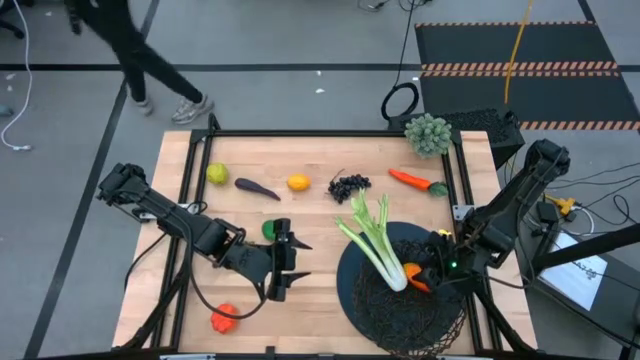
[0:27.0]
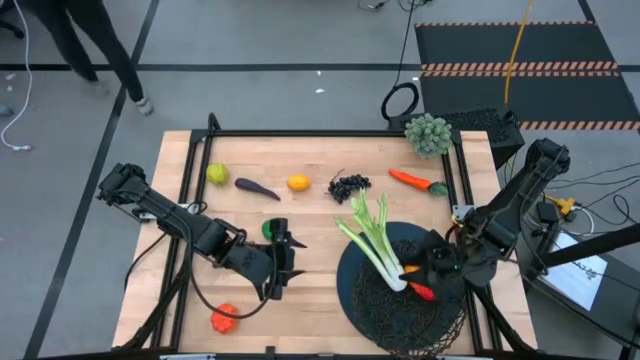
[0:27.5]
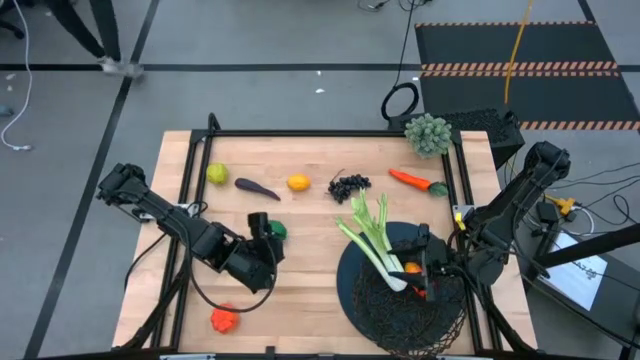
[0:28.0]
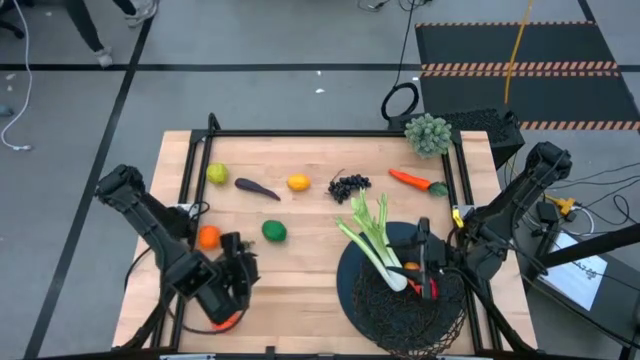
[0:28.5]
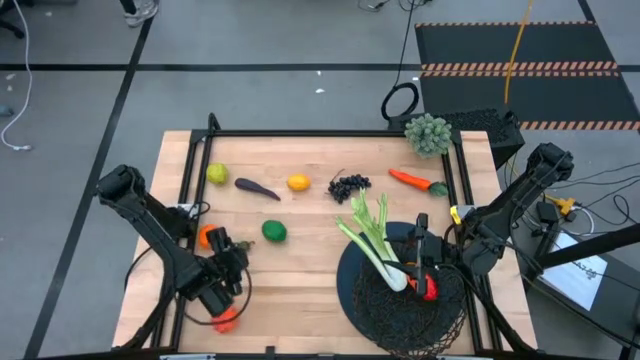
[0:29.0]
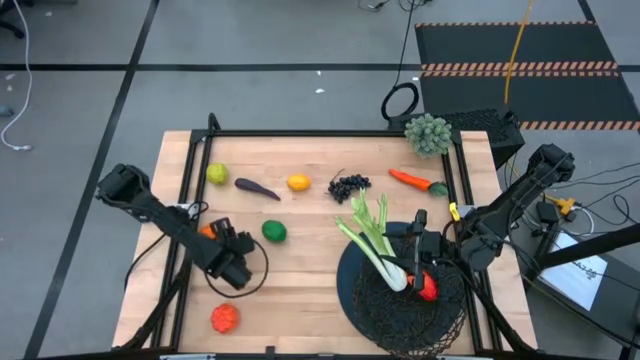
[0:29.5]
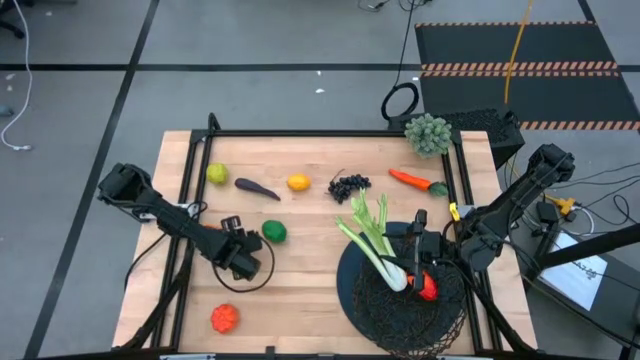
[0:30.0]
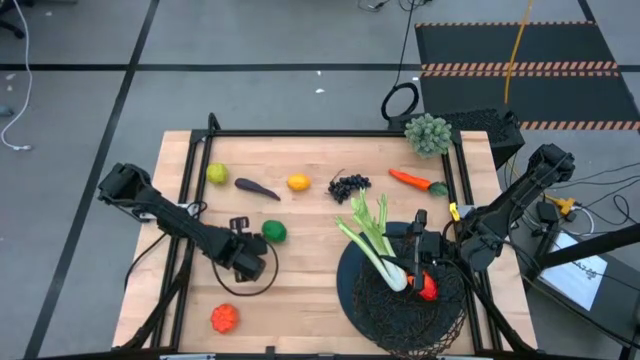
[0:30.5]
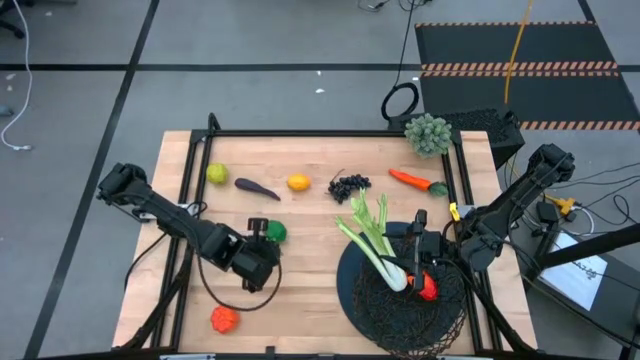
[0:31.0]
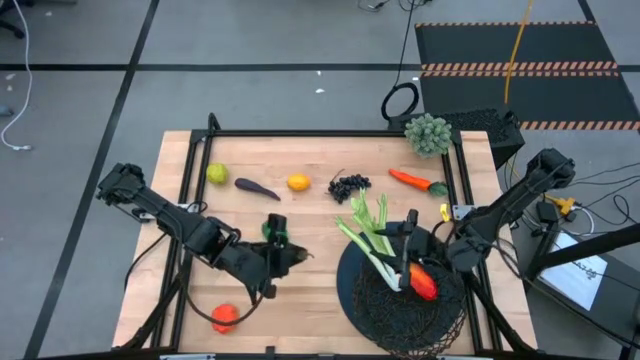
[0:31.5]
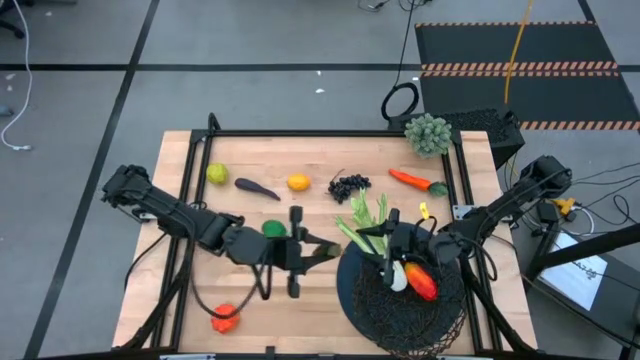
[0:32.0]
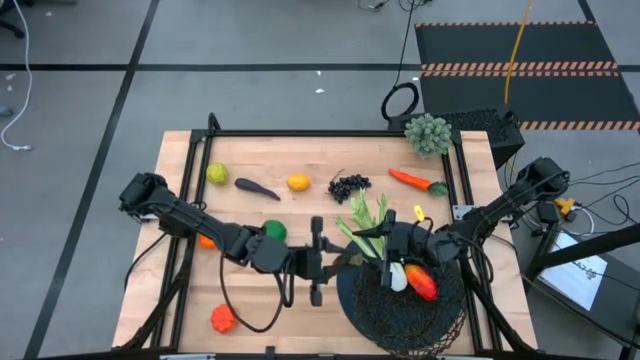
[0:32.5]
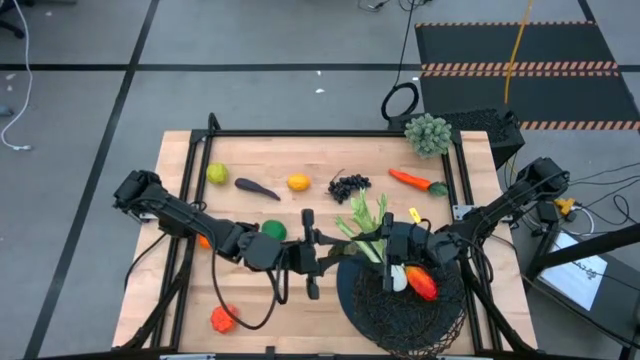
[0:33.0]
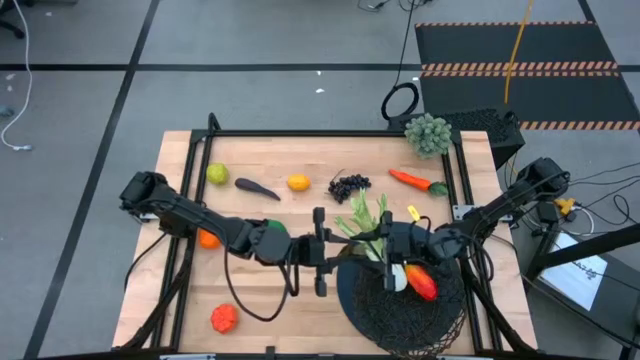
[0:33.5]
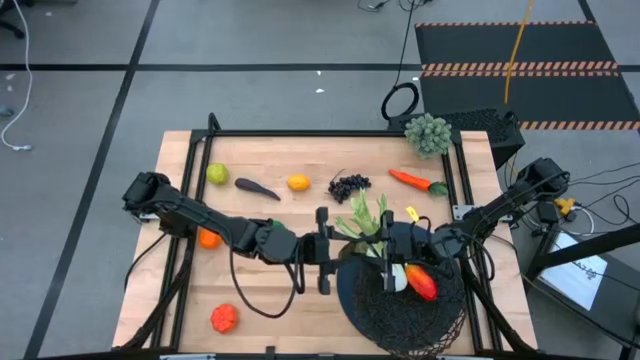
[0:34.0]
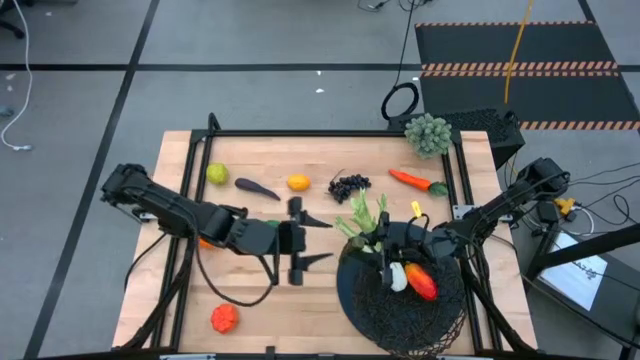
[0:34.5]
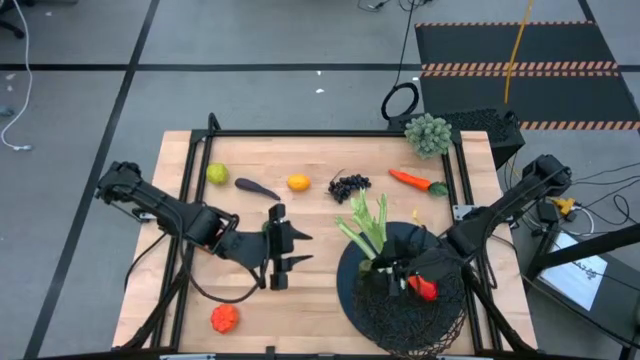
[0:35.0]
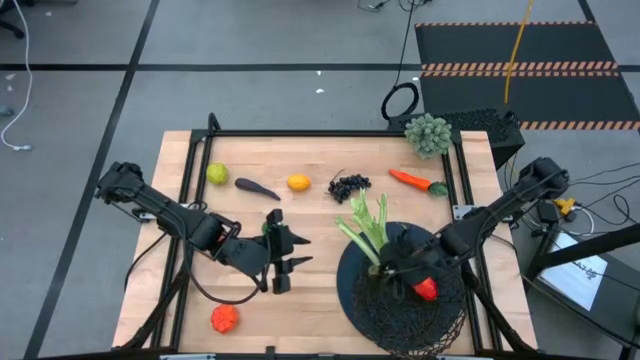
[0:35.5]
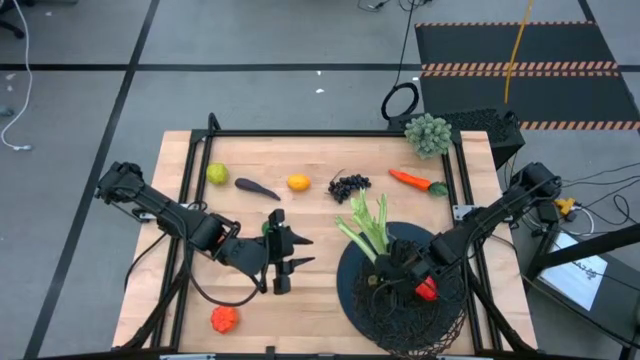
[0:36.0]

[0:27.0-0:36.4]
Task: Build produce basket
Put the green chili pepper into the wire basket

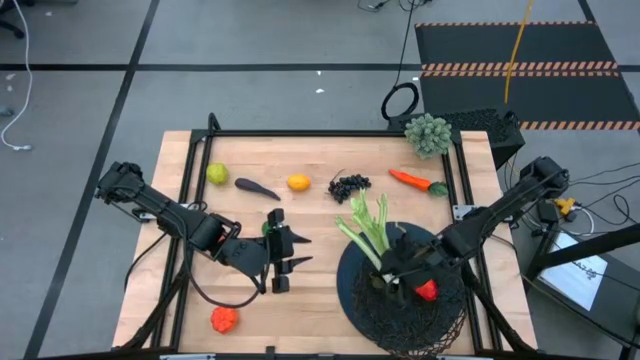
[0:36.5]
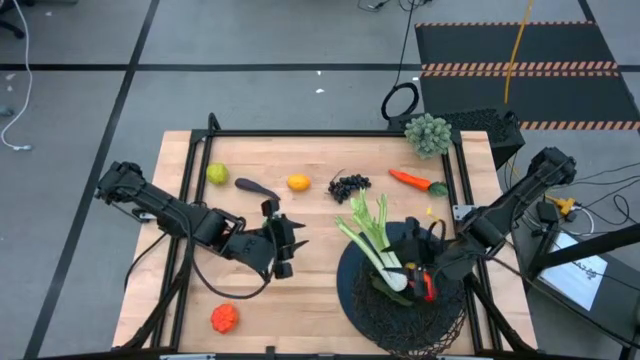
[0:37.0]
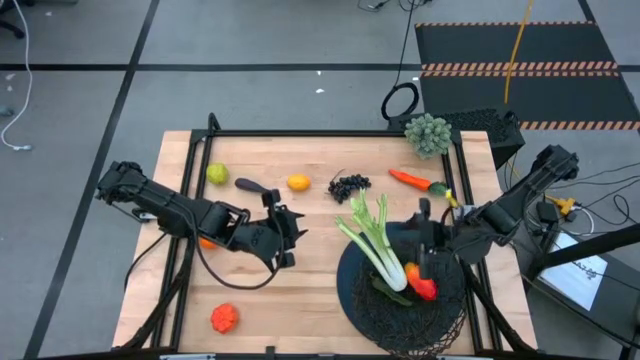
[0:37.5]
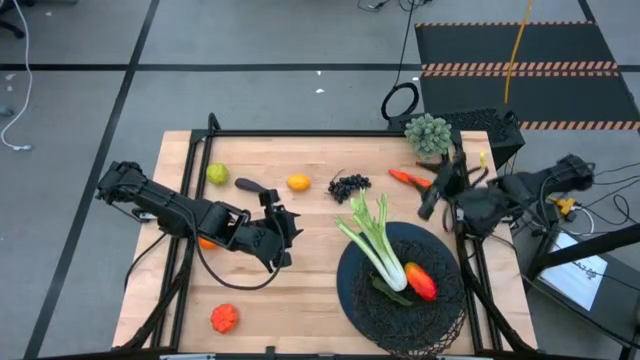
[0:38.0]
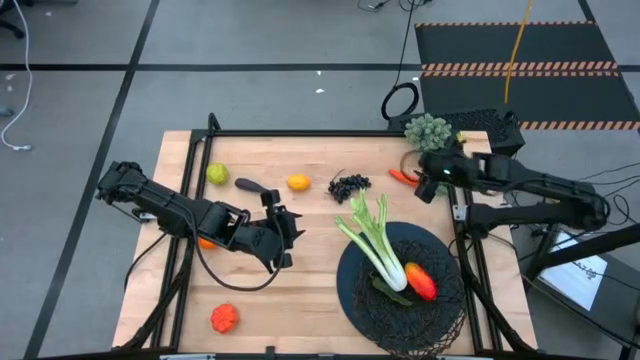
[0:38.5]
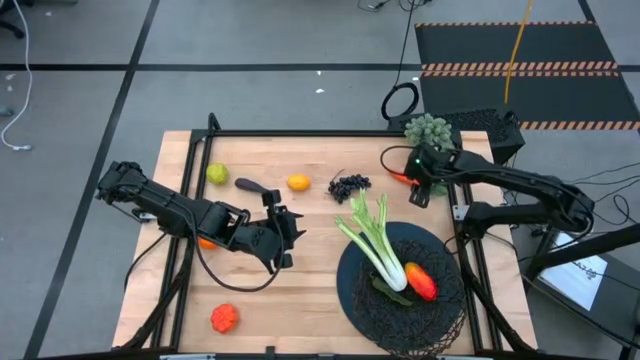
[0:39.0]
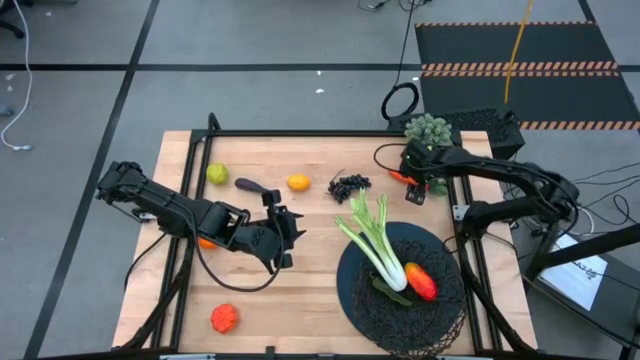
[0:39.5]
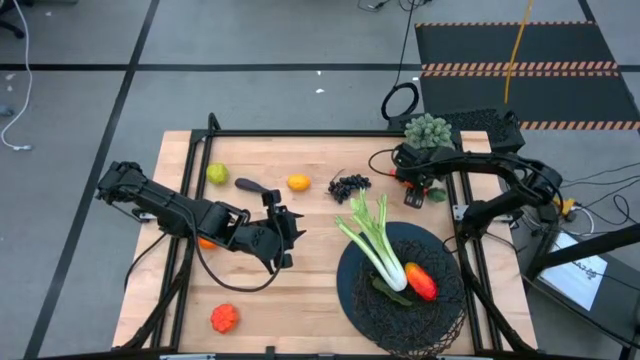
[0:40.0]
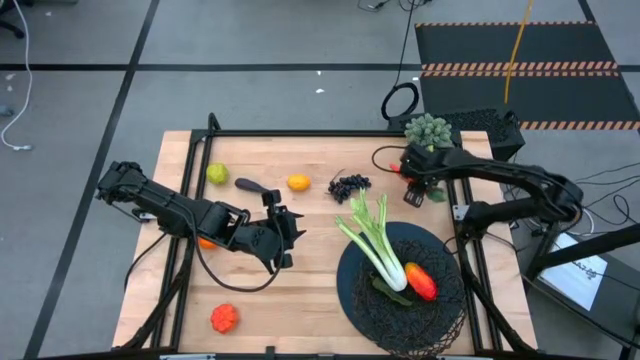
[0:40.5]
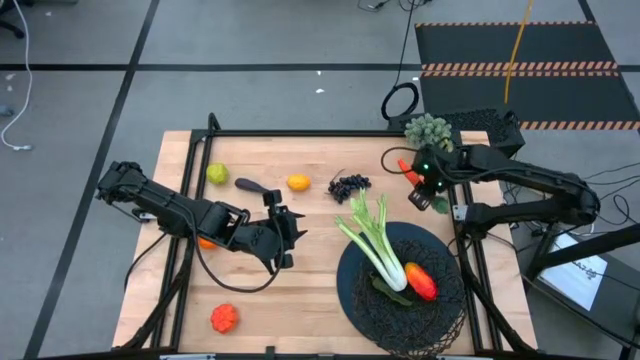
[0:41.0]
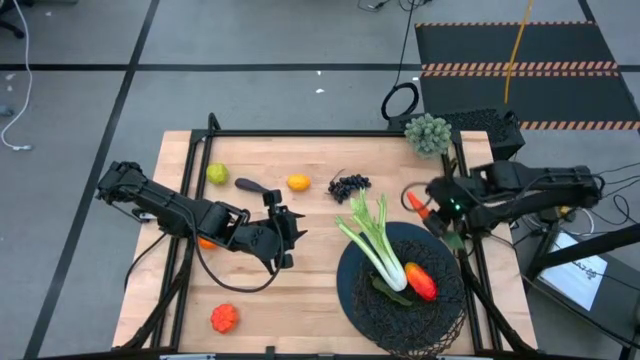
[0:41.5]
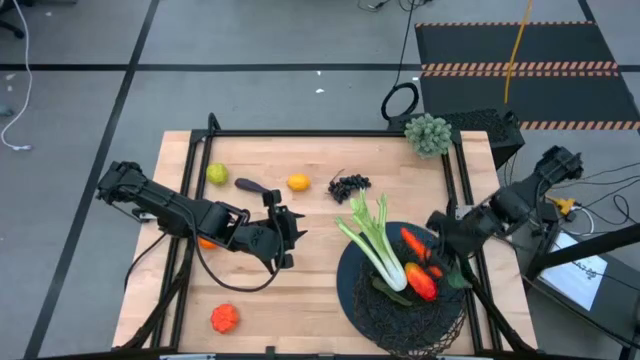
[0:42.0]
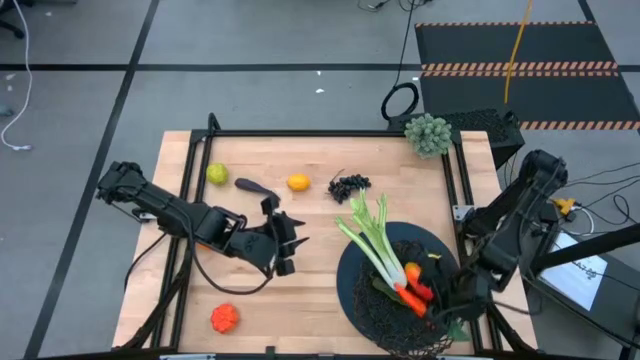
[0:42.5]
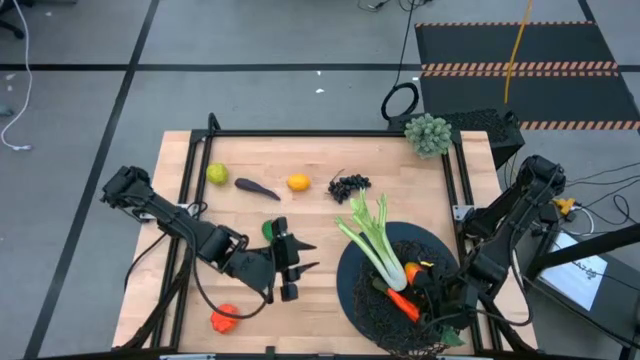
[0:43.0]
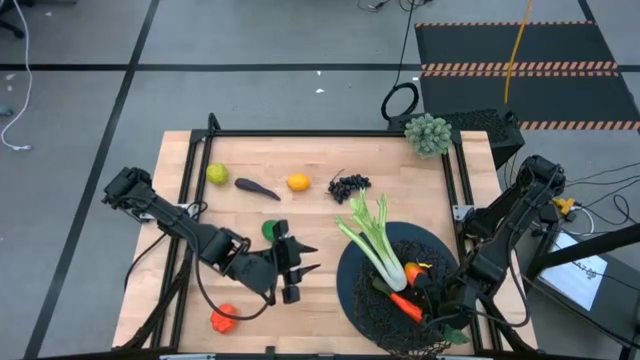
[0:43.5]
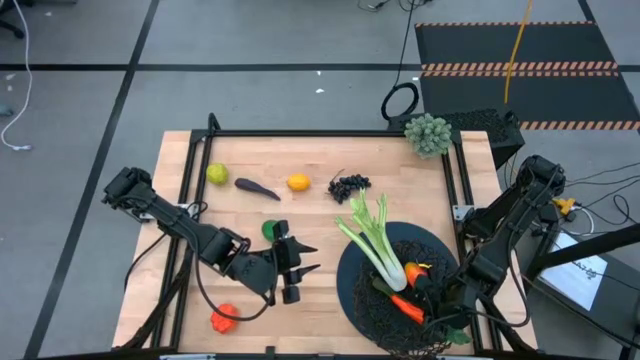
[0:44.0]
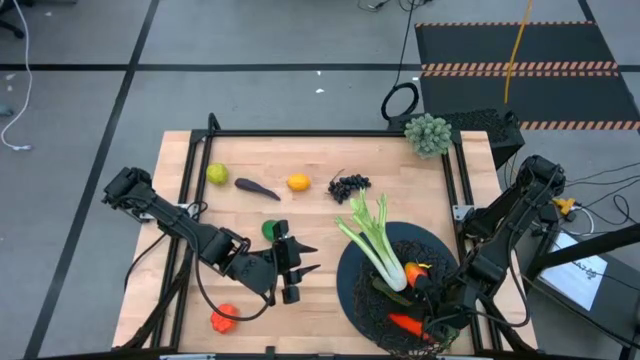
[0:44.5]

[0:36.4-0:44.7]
Put the carrot into the wire basket

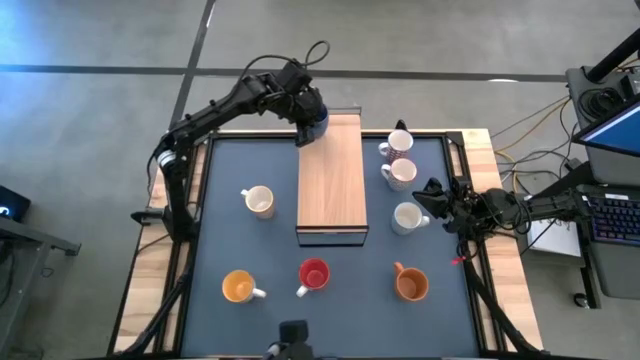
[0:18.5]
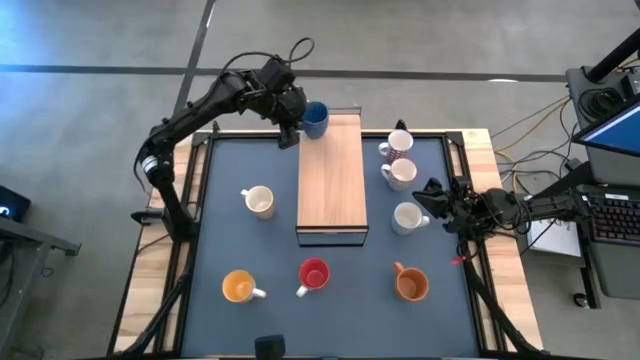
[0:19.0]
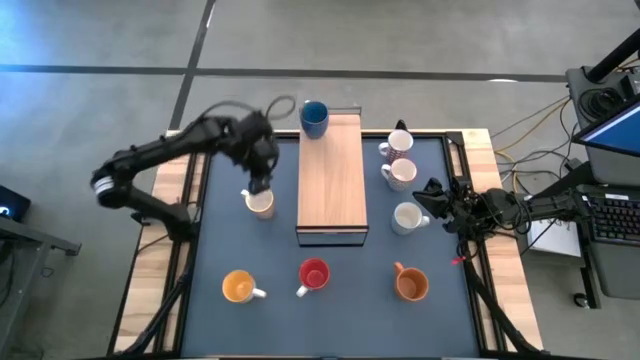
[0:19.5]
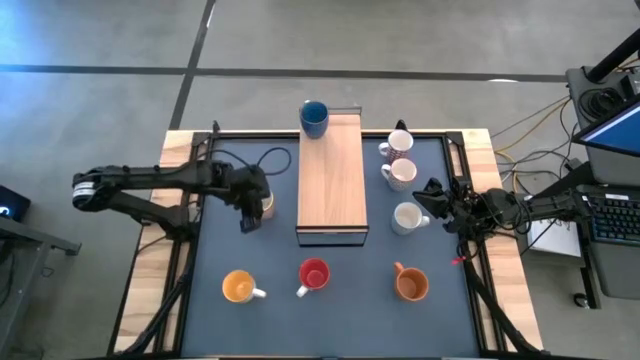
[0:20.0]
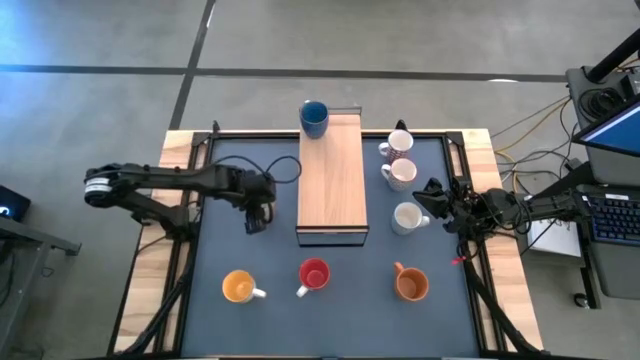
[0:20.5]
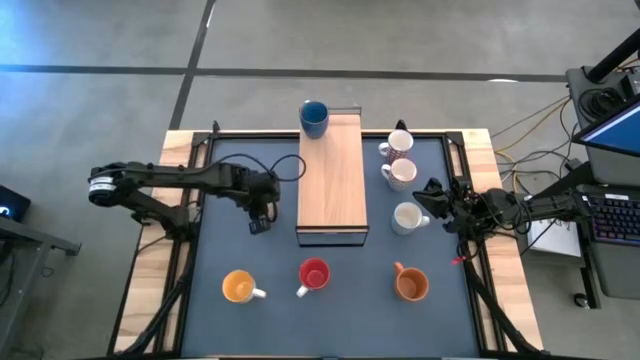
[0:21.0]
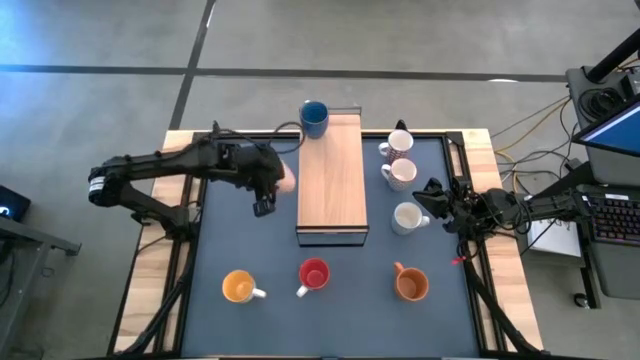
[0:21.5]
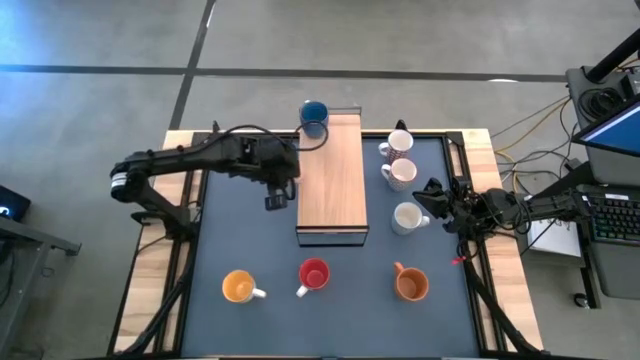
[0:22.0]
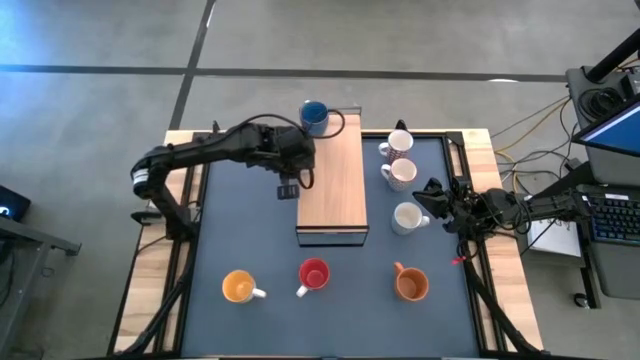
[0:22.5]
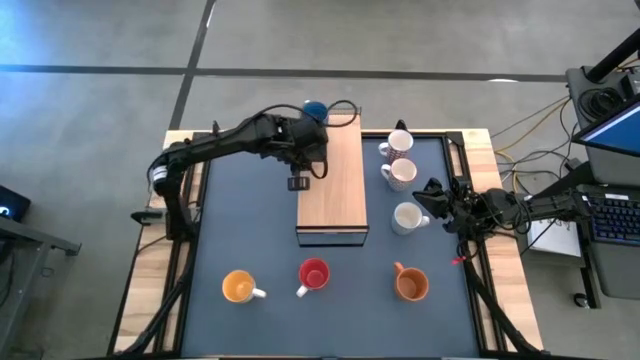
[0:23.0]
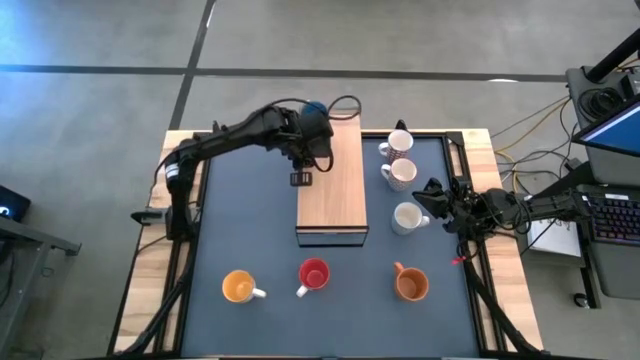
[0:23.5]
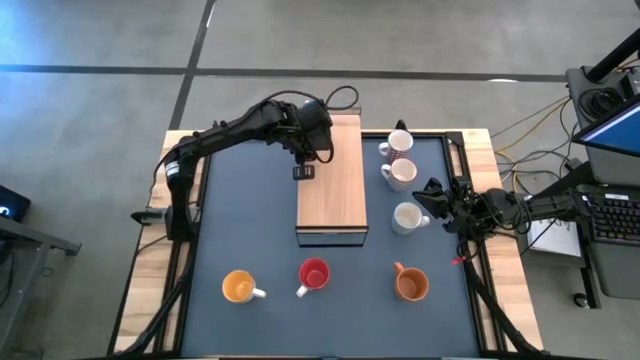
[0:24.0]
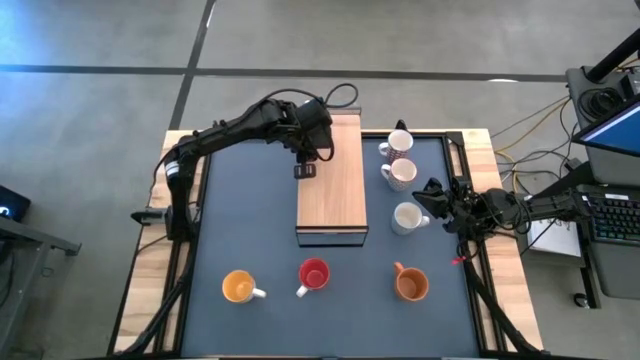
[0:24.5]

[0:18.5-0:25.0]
Task: Place coffee mugs
Put the yellow patterned mug on the shelf
